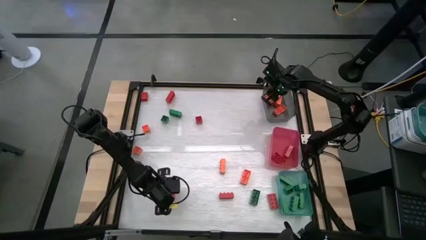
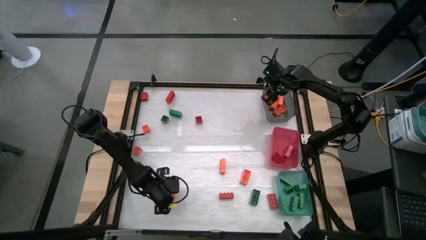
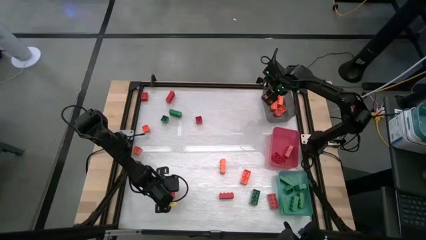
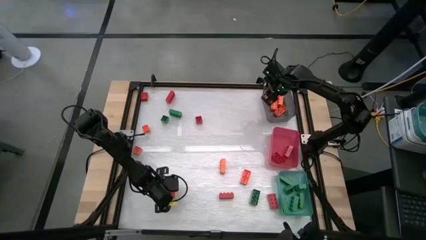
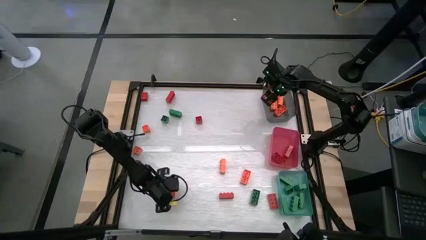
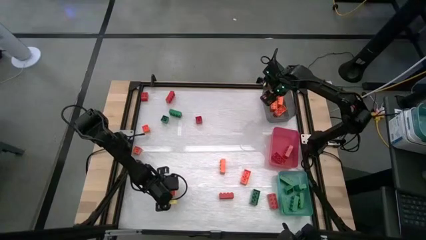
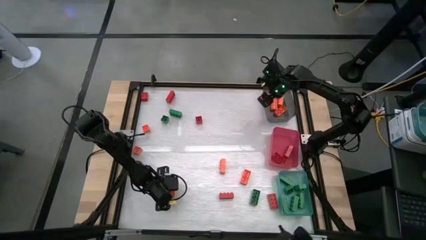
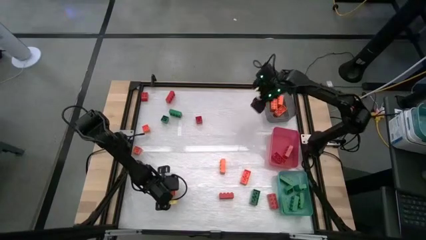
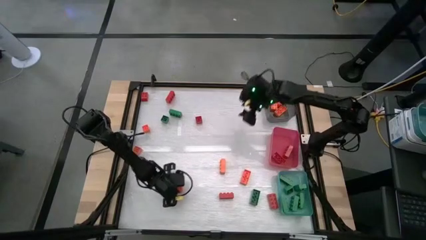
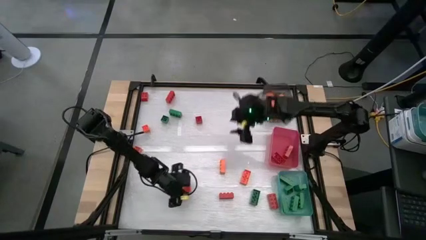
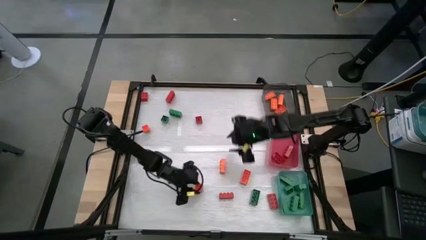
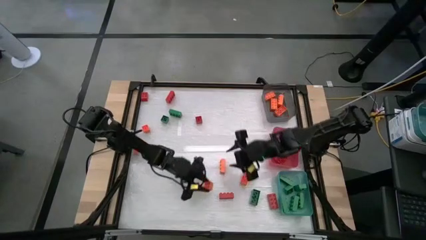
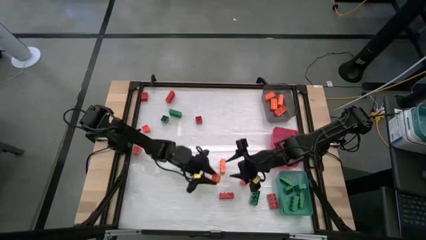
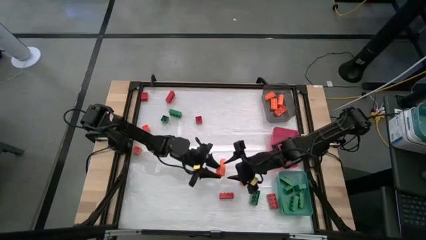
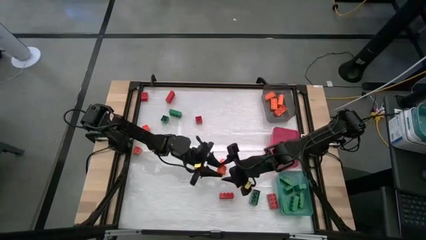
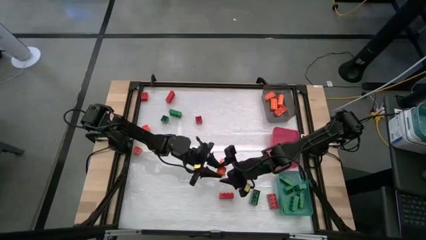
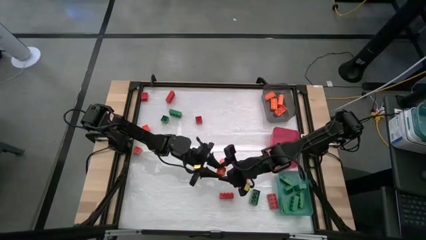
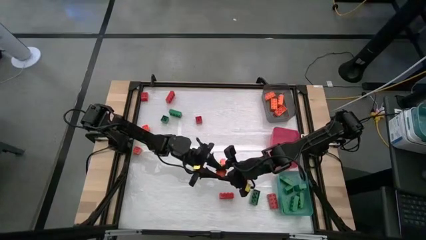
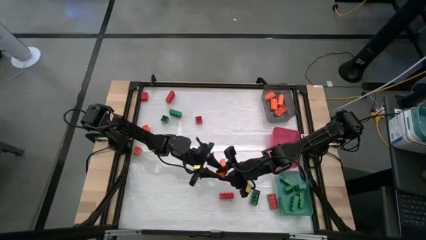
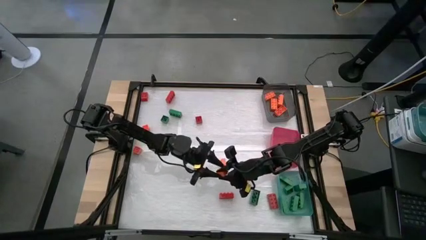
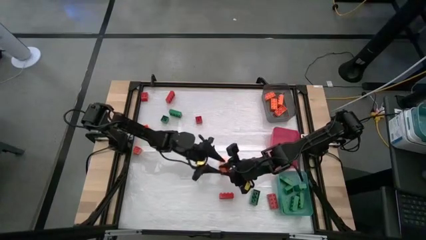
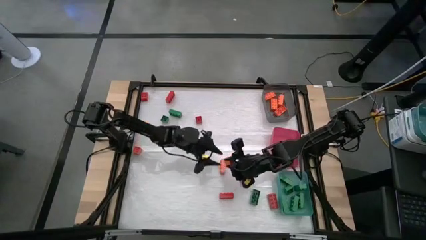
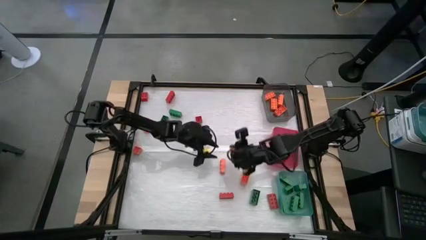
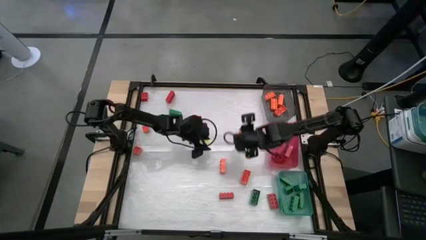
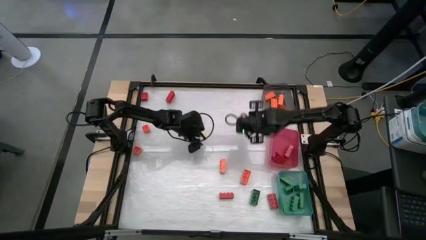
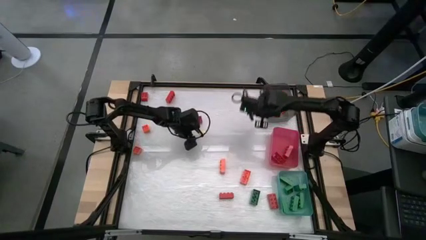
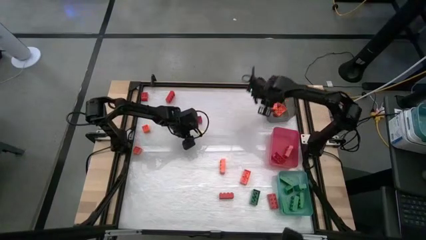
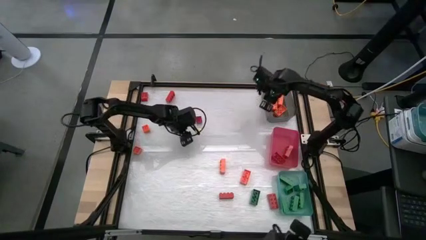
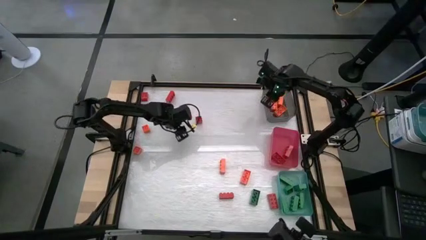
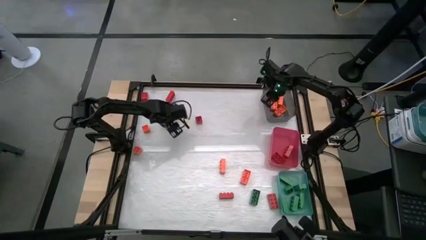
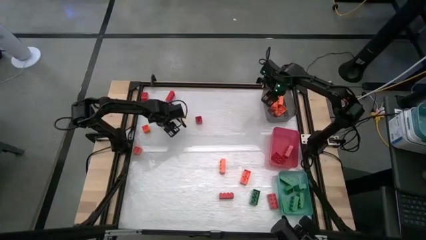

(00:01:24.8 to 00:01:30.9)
Task: Sort blocks
Put the orange game piece into the black bin

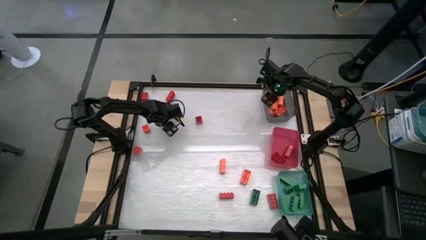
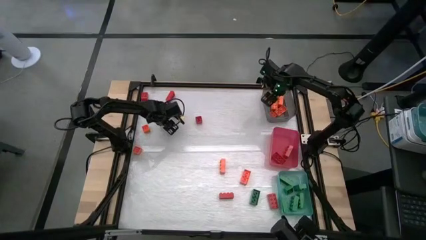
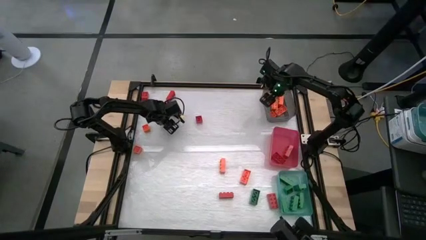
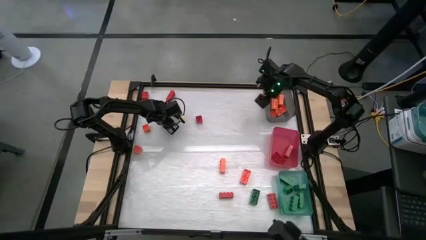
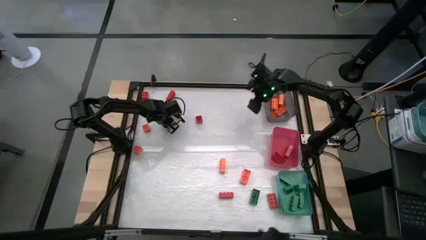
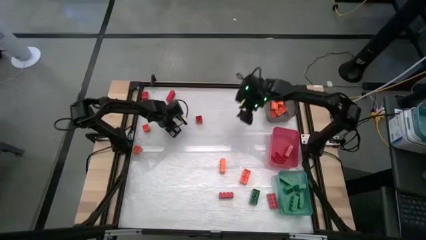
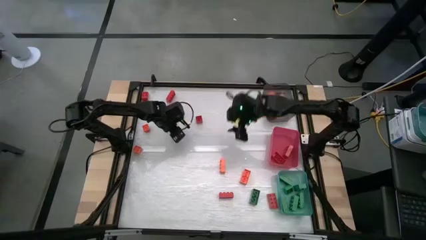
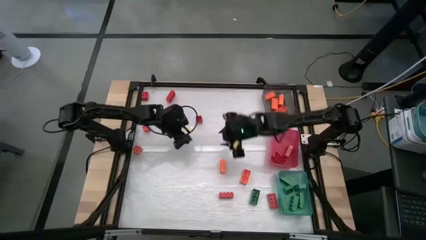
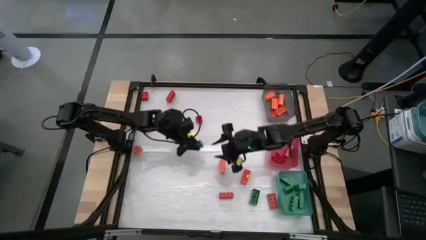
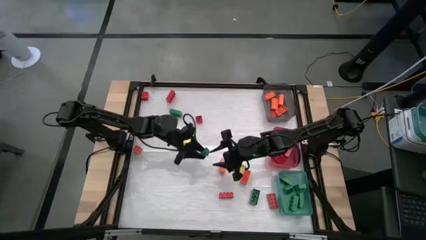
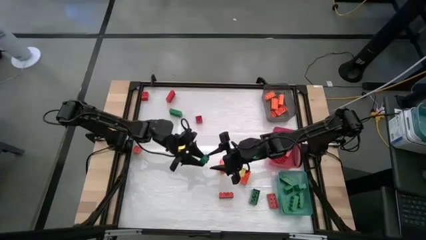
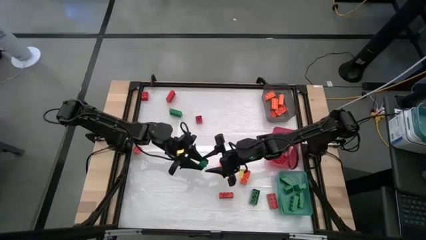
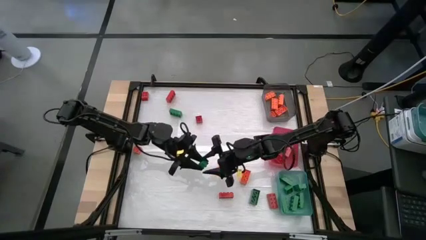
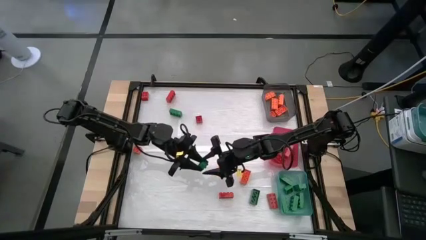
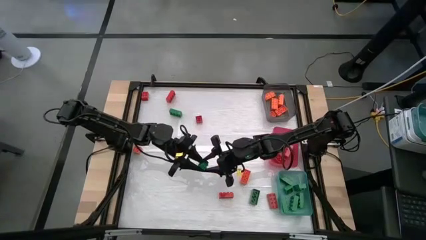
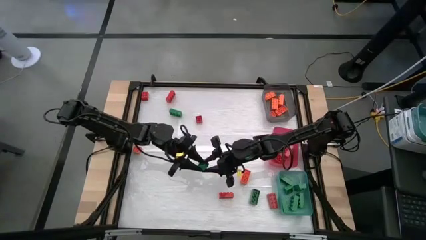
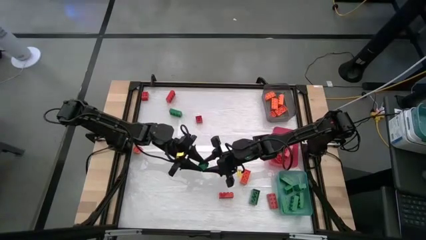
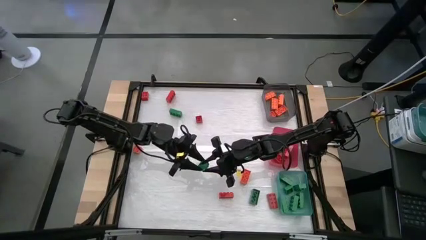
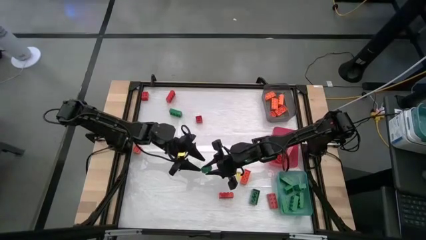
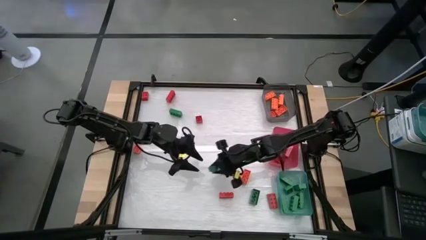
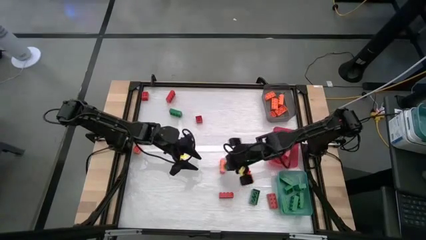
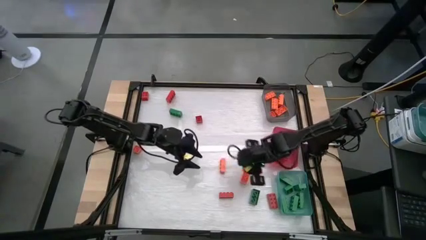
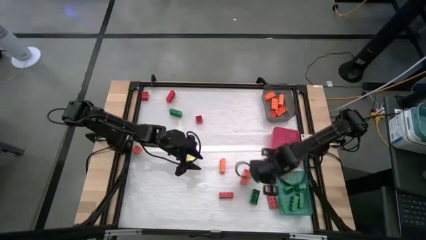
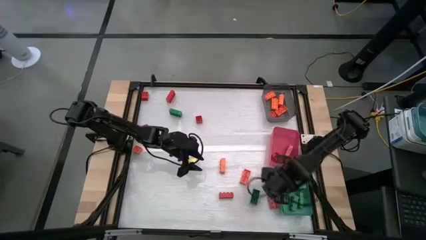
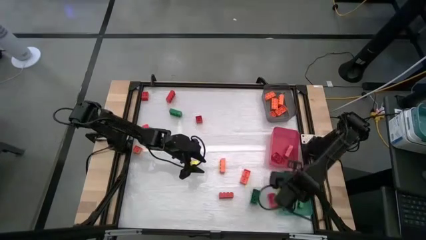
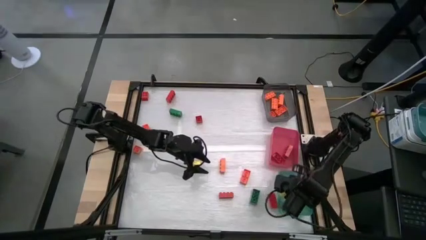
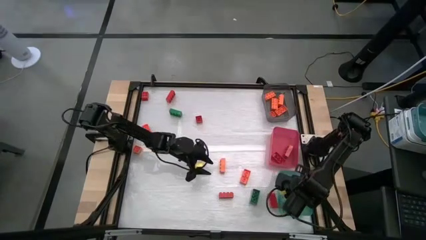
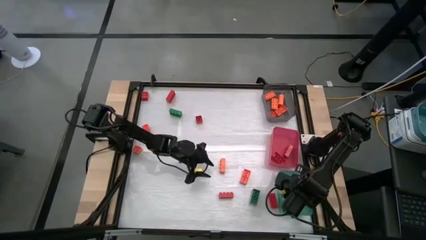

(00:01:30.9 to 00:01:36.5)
Put the green game piece into the blue bin

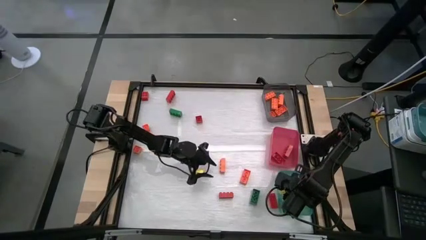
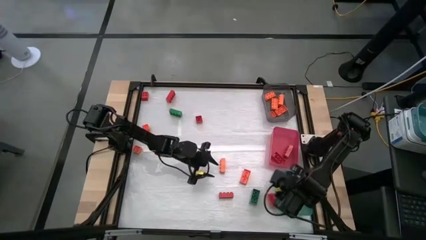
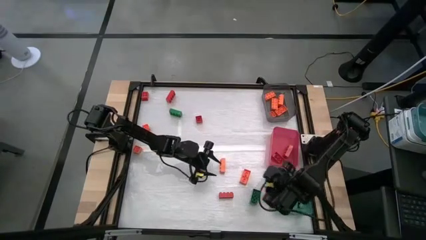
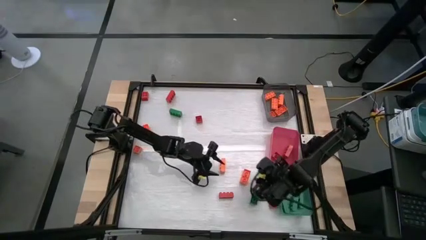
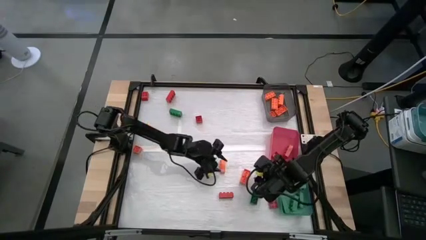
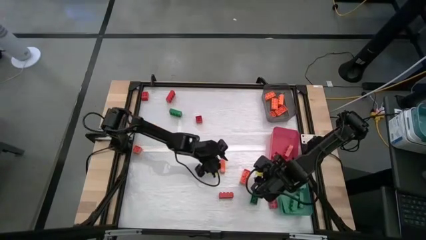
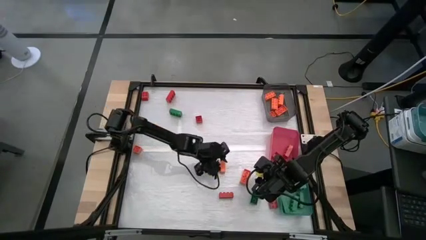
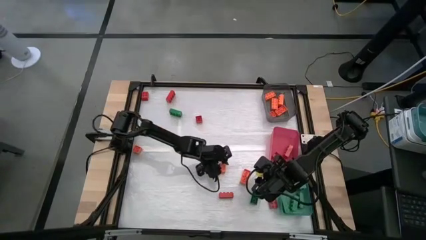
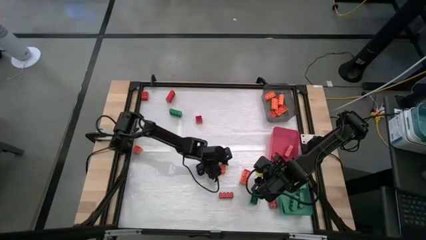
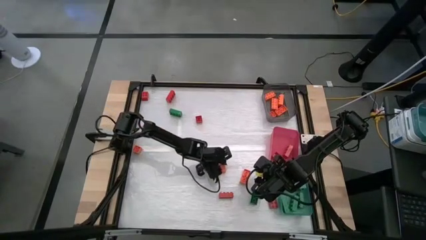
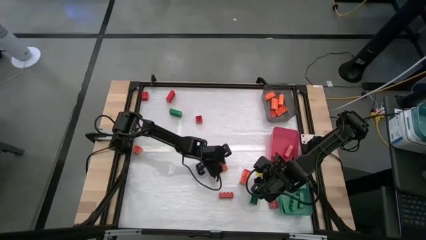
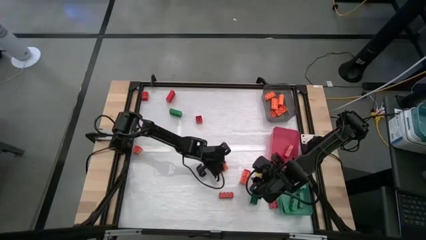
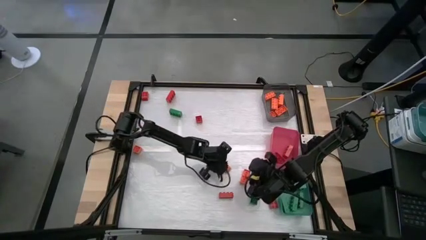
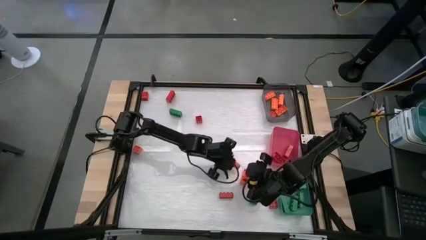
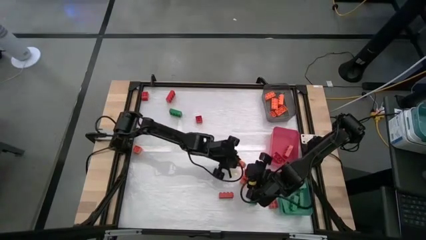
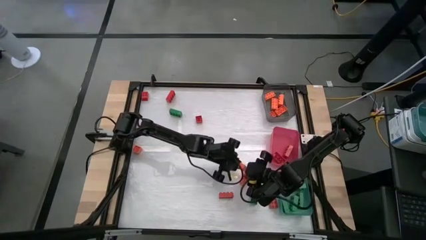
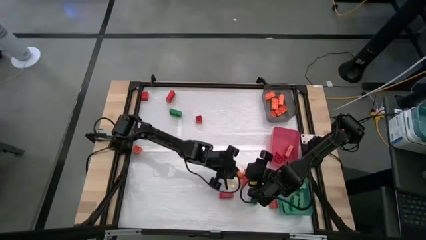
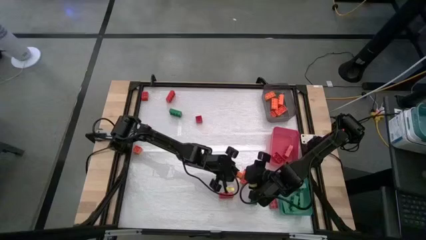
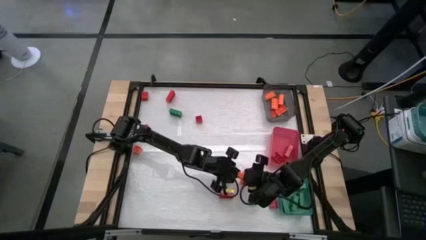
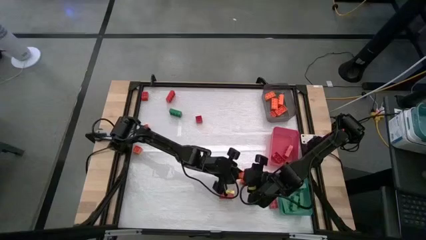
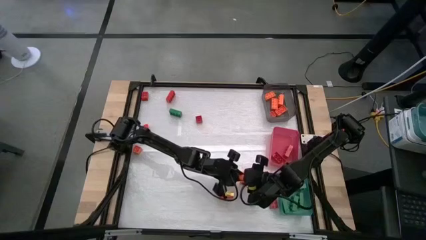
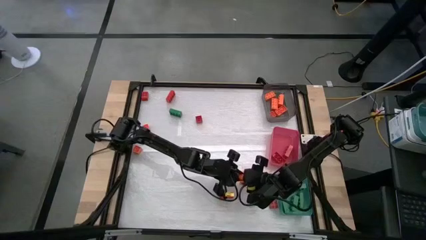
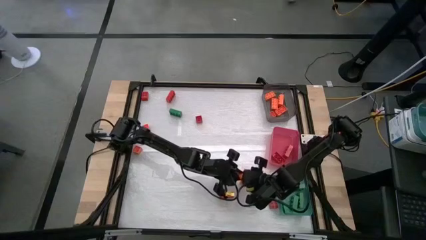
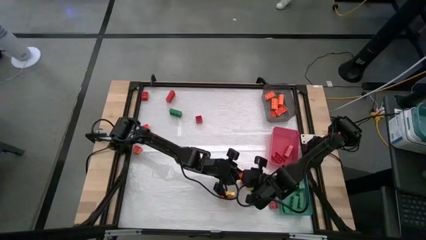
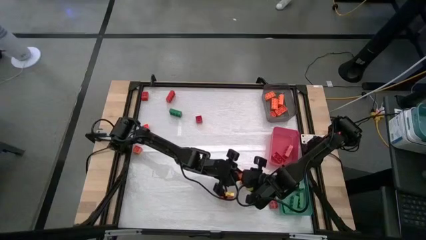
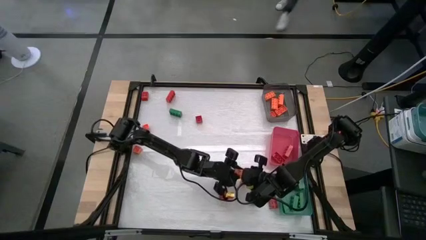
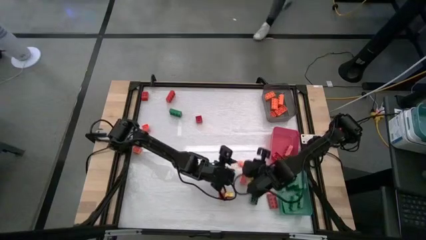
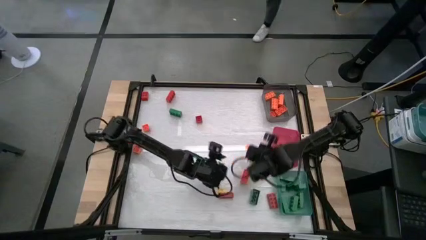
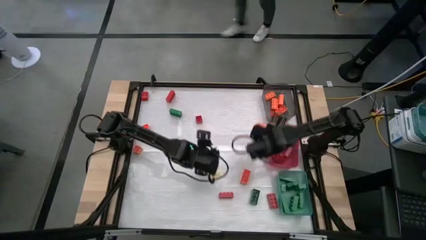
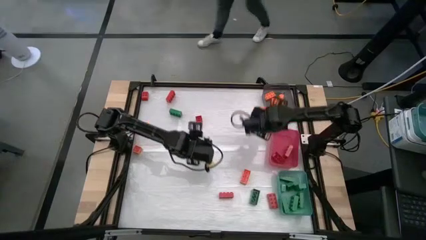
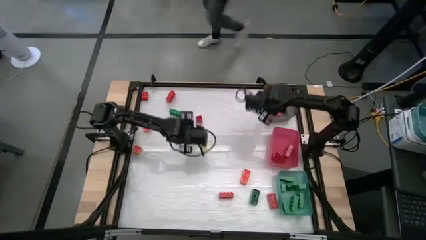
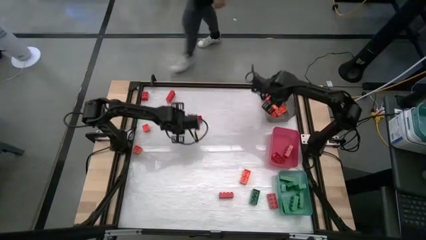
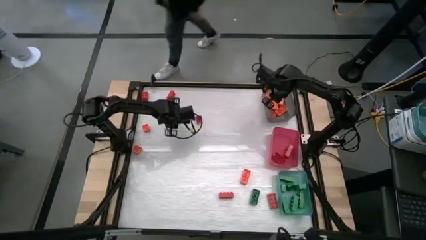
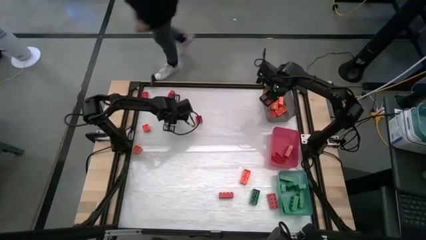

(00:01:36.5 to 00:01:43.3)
Put the orange game piece into the black bin
